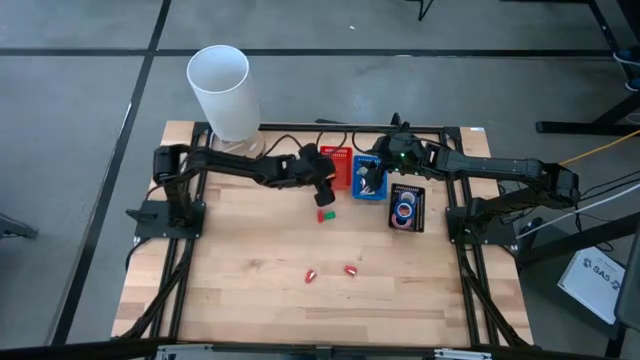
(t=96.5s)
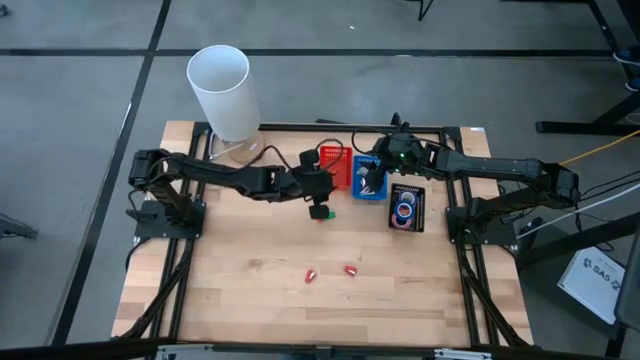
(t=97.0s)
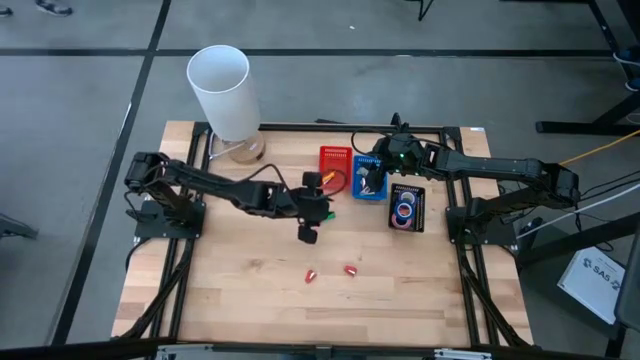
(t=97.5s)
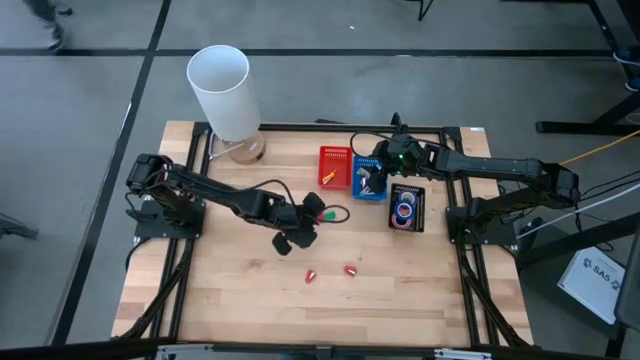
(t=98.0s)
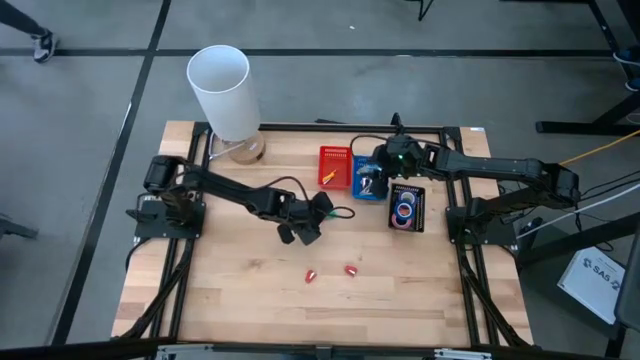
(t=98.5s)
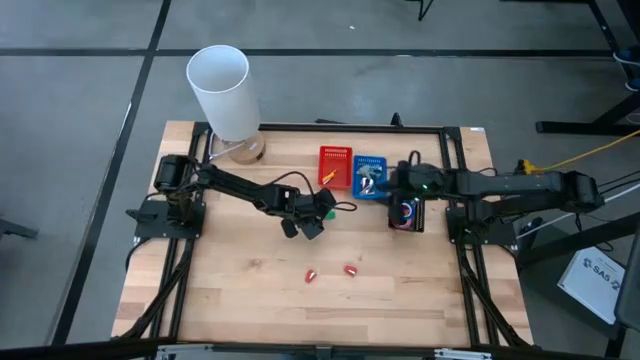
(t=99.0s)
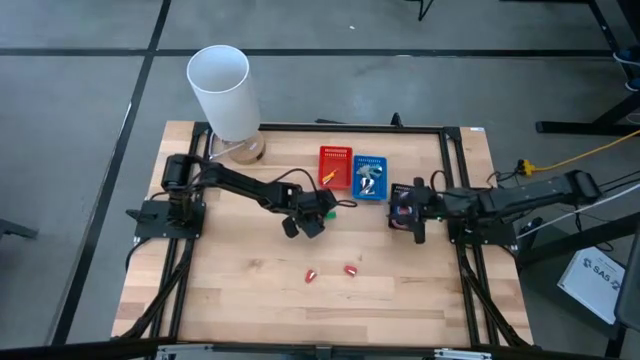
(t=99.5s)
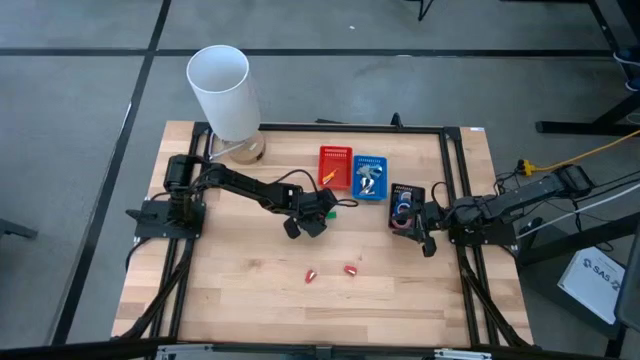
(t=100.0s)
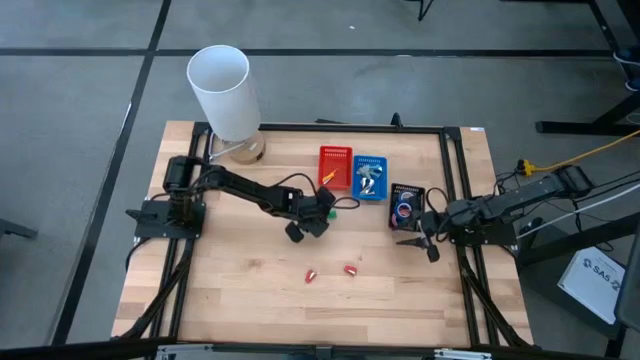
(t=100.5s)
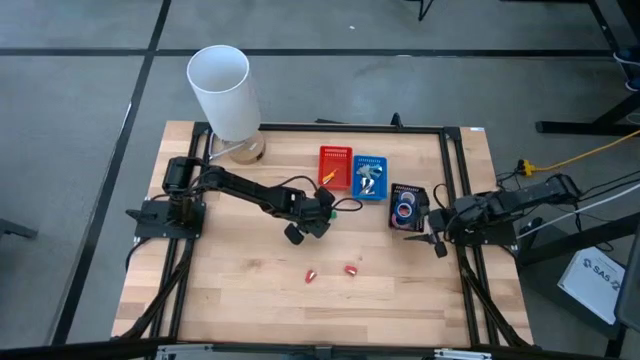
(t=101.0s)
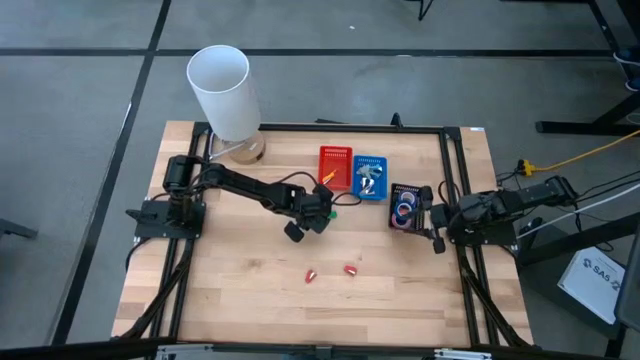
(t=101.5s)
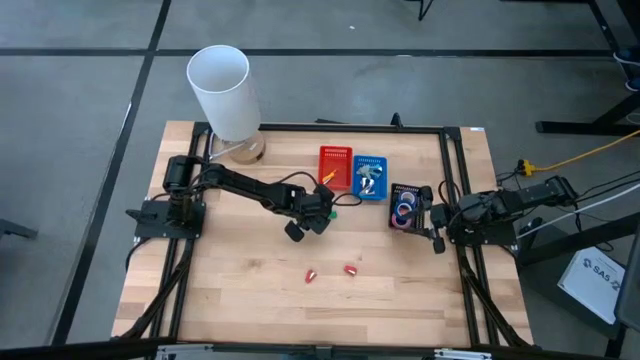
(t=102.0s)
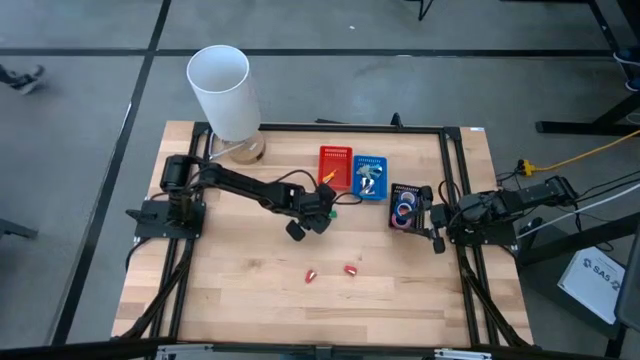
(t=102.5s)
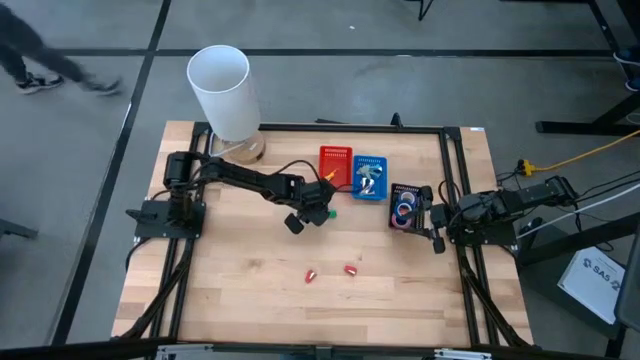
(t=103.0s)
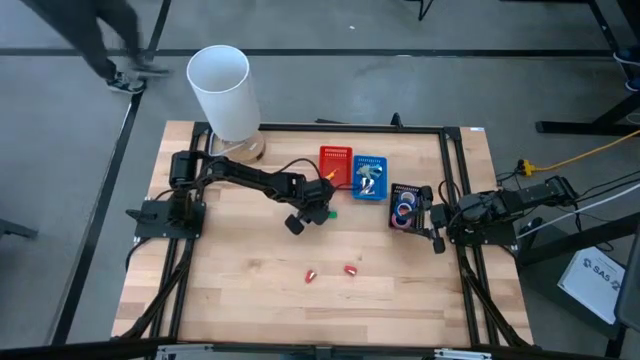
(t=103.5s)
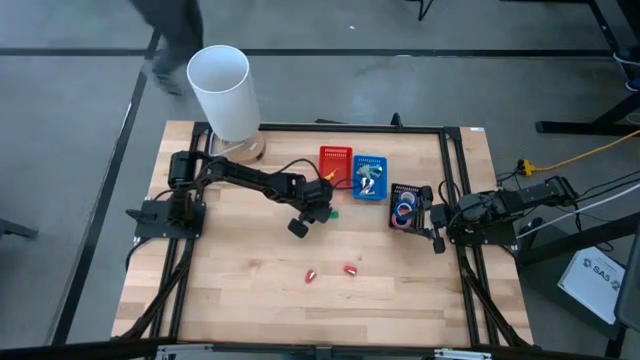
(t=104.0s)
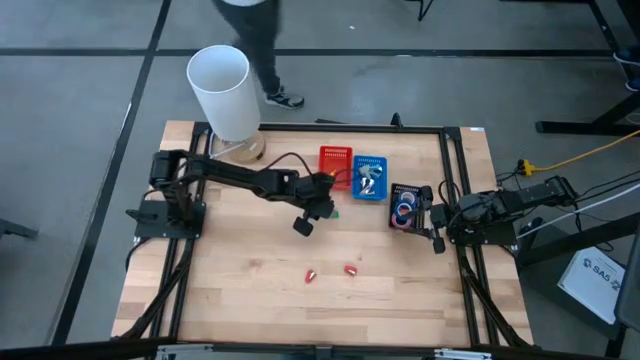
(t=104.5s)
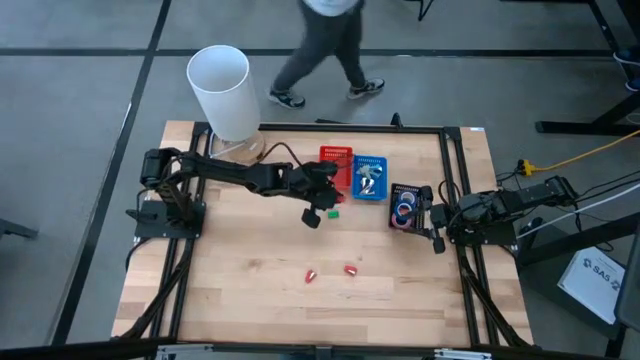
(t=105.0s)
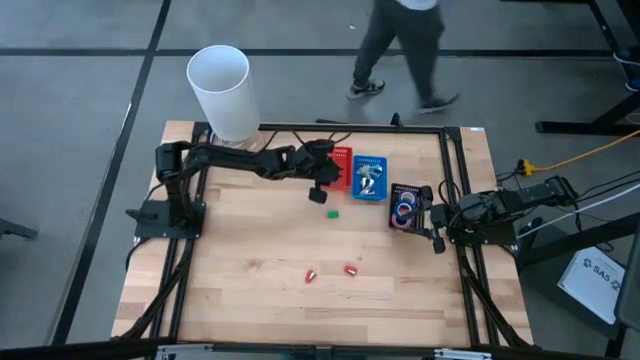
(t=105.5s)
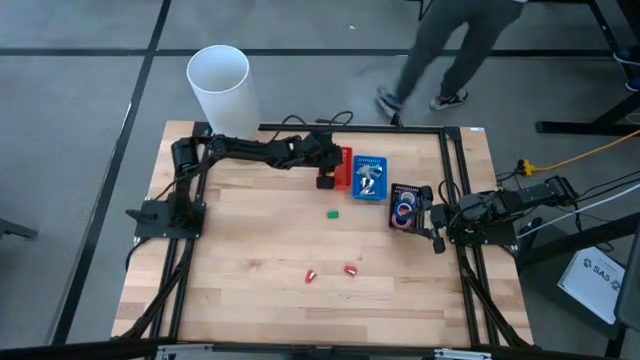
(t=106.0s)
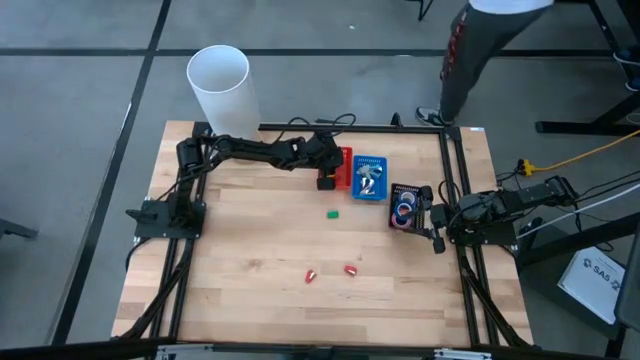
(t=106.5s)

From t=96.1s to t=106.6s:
Task: Pick and place Stapler, Stapler remover, tape
Put the top red mini-stapler into the red bin

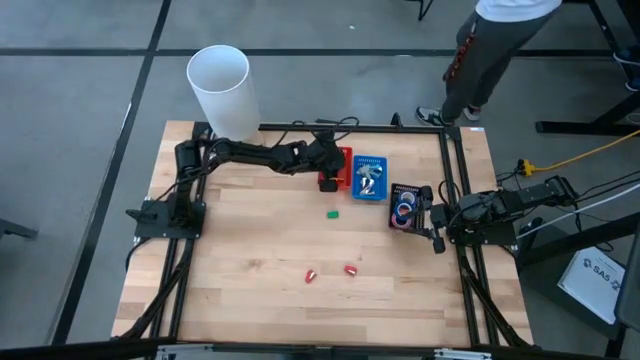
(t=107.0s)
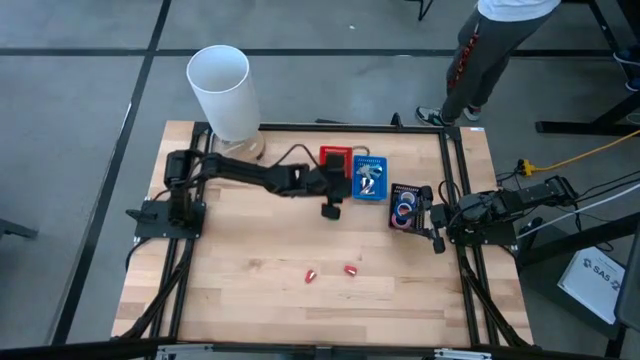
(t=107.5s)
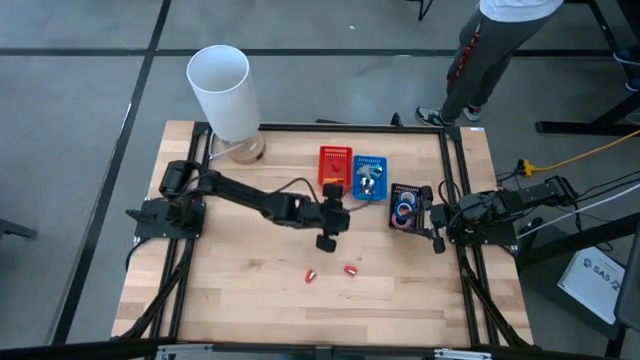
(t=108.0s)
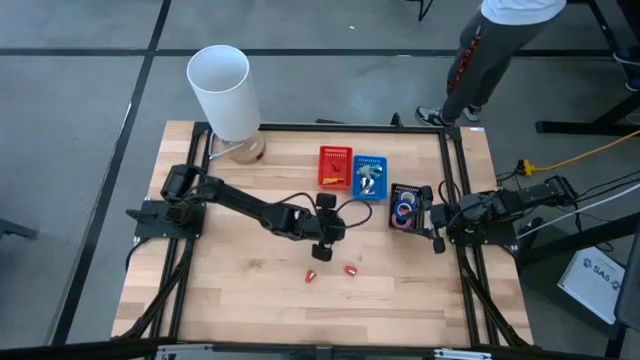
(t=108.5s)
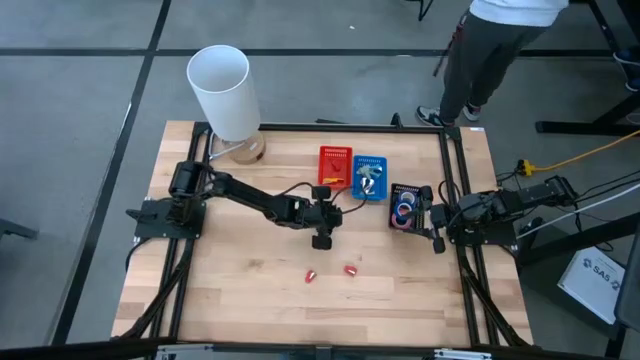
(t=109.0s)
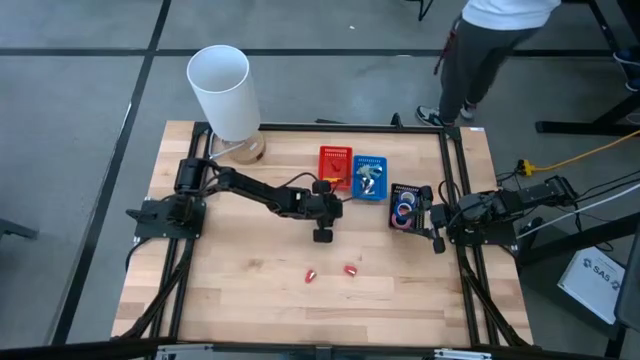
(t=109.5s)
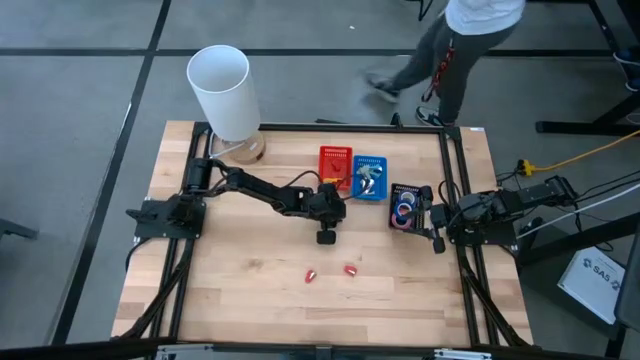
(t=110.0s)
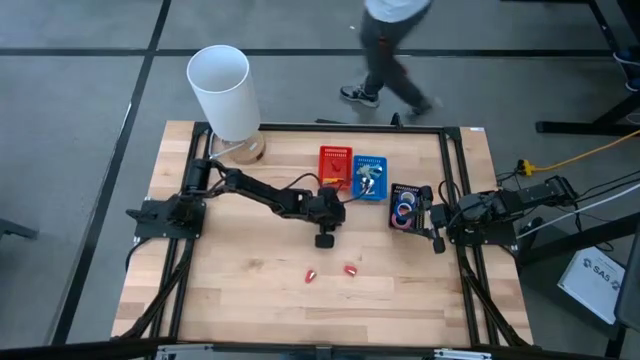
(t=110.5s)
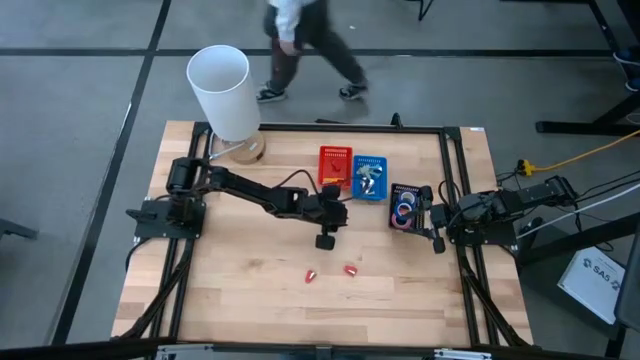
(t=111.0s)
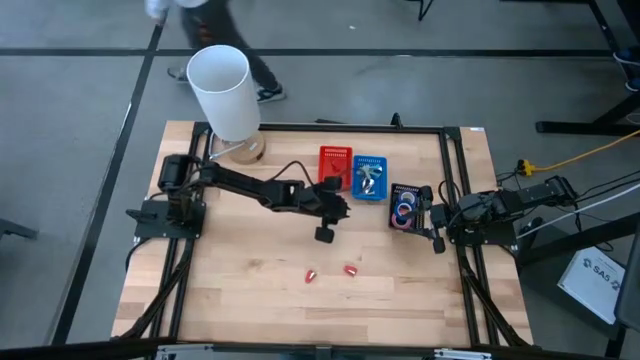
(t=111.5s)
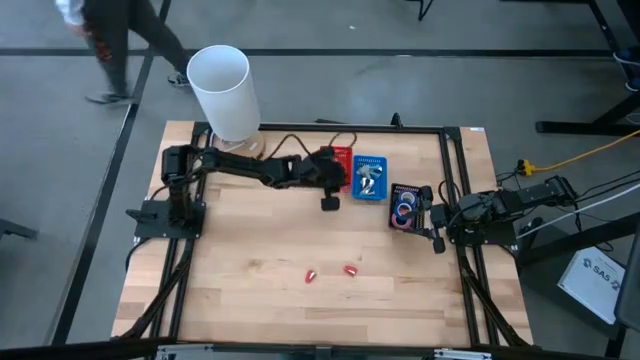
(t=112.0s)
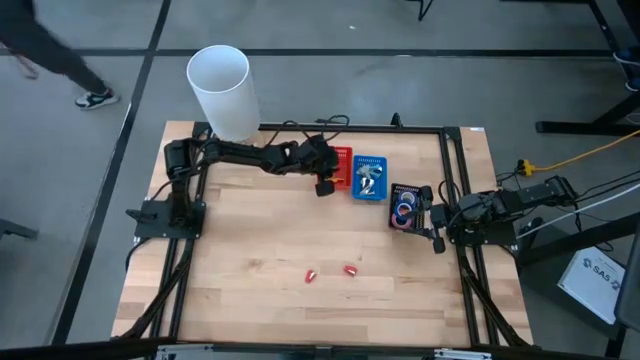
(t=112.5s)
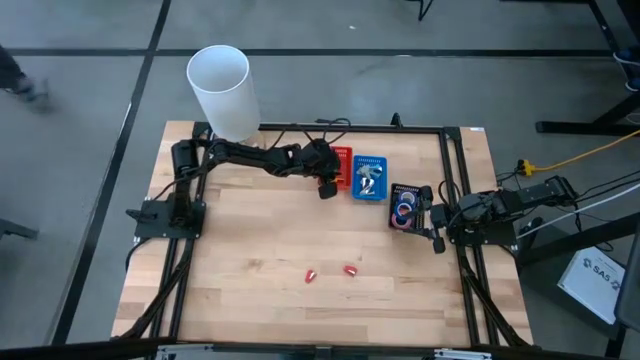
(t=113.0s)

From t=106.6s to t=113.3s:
Put the green mini-stapler into the red bin
